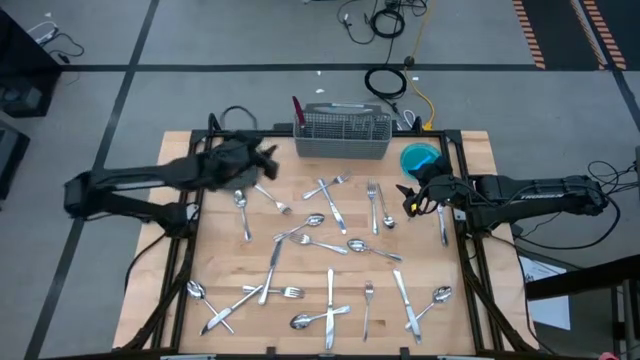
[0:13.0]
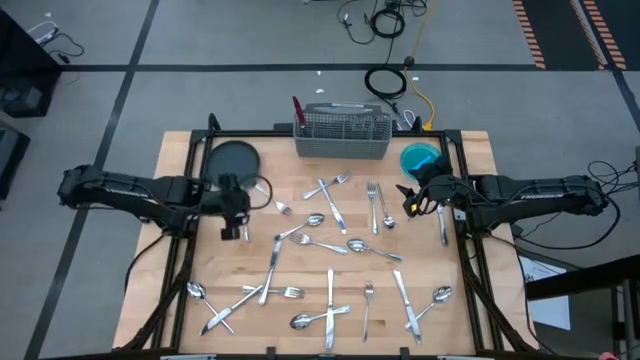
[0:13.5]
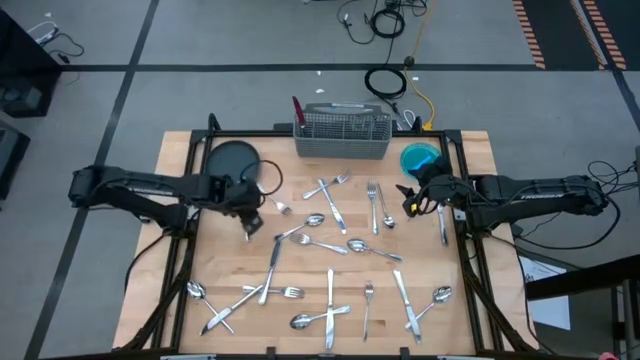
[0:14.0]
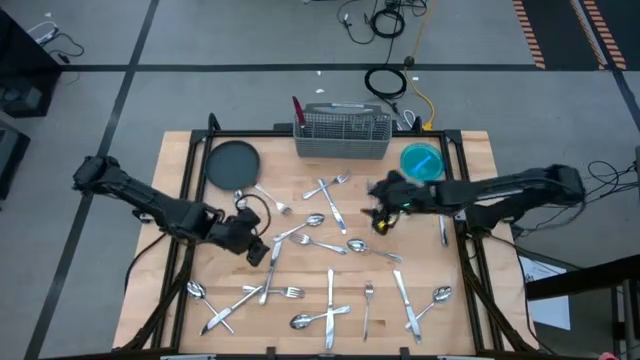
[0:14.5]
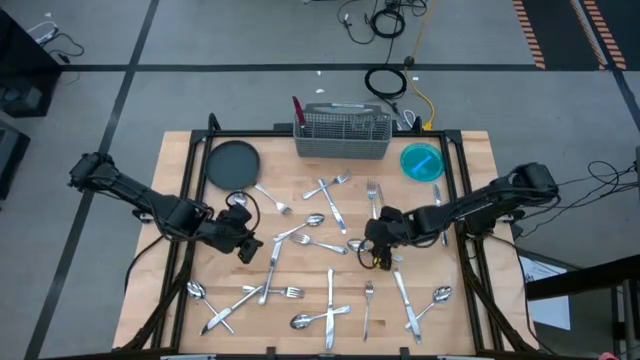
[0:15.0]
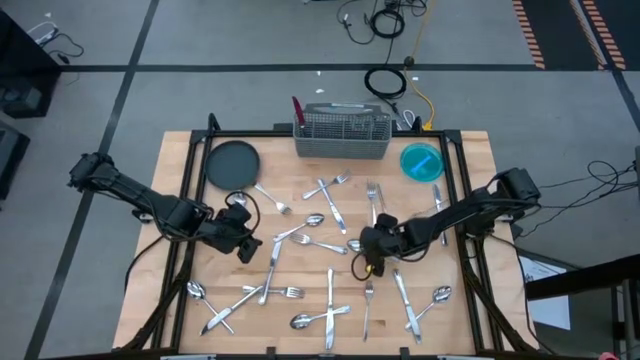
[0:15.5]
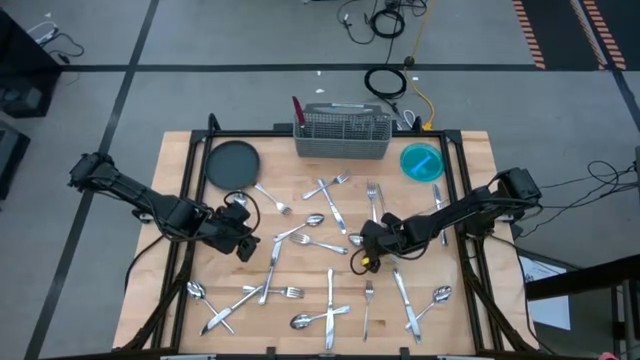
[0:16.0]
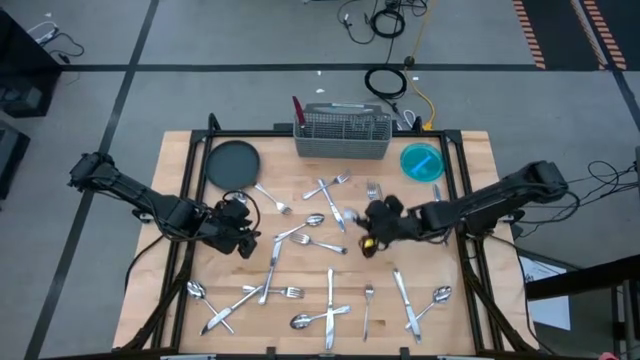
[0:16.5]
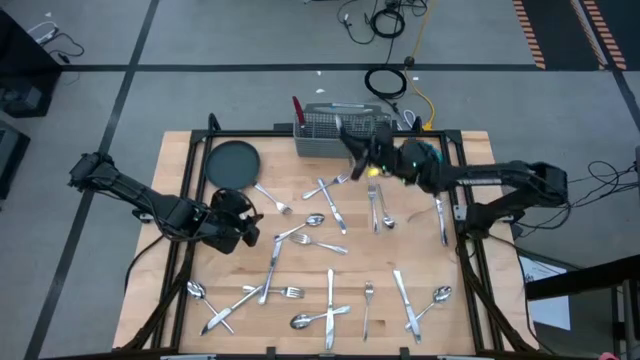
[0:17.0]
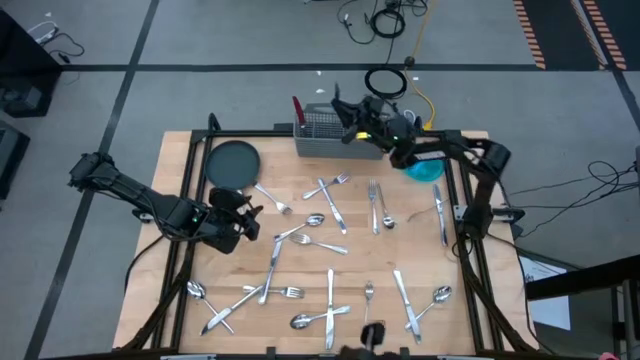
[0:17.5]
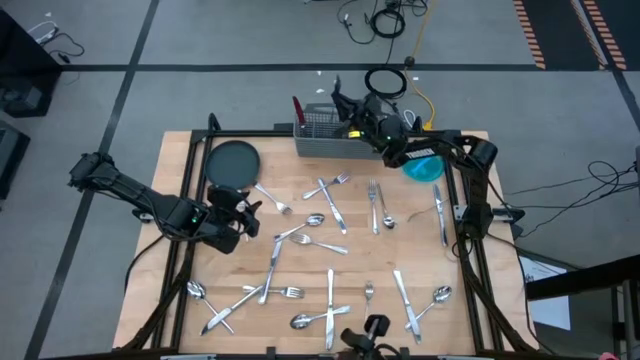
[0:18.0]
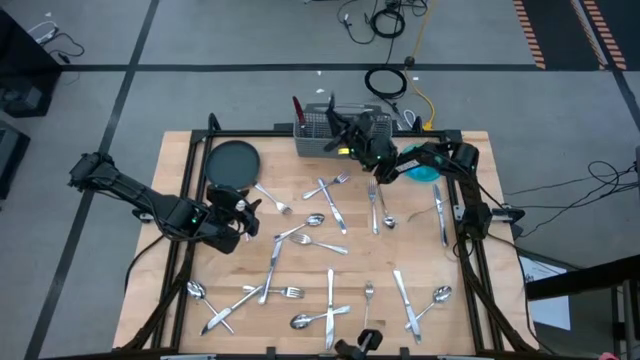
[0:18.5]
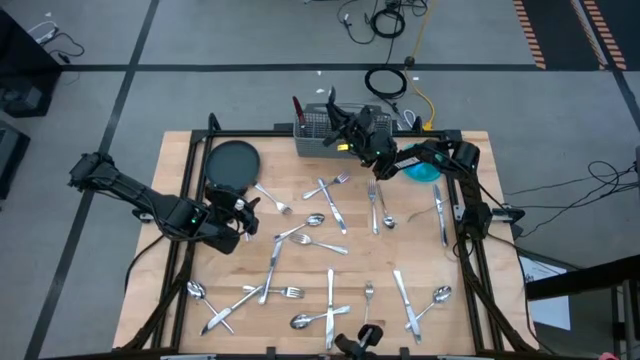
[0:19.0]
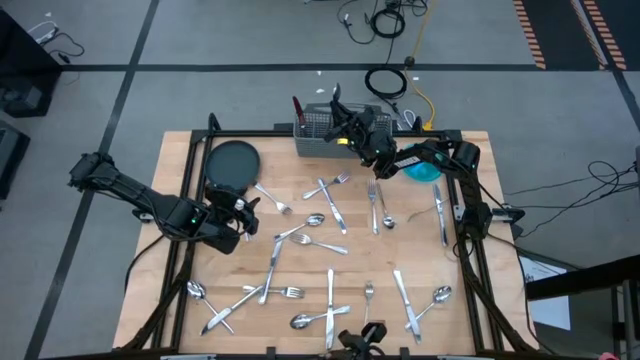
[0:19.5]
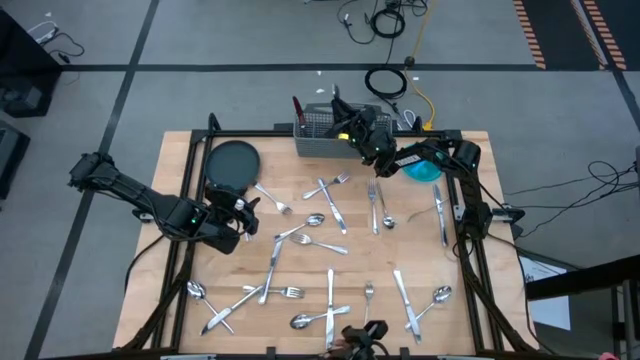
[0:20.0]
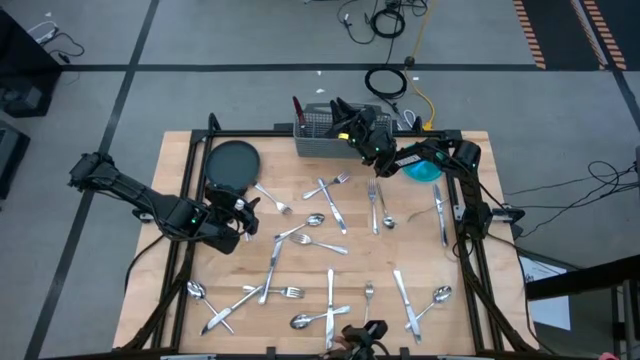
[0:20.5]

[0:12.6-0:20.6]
Task: Sort silverware
Put the spoon into the silverware organizer

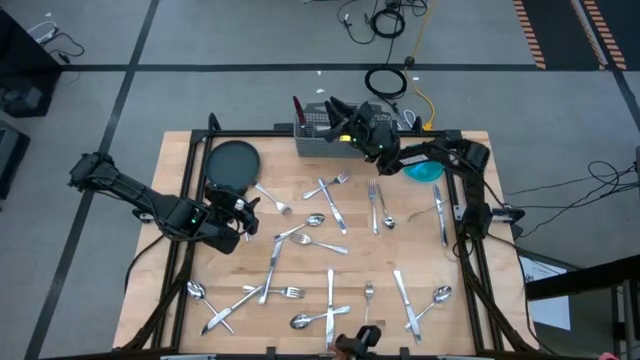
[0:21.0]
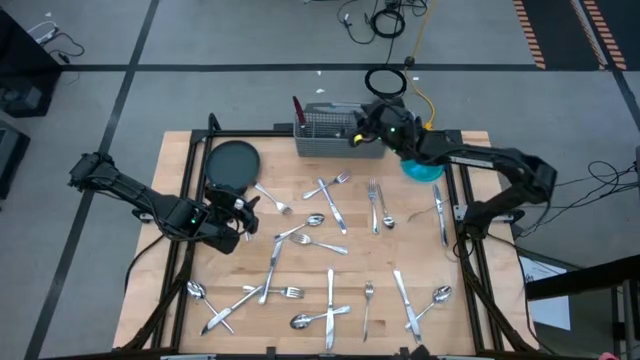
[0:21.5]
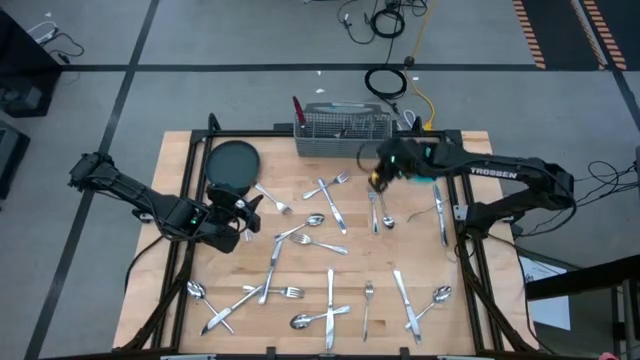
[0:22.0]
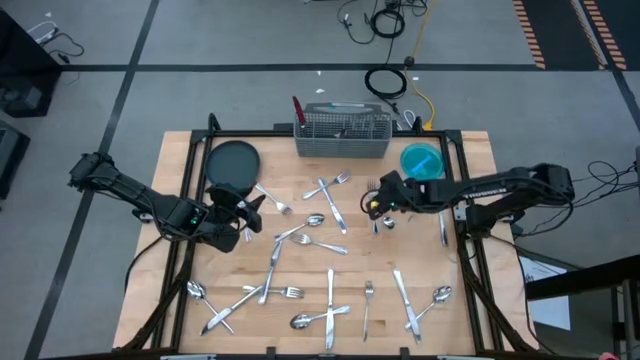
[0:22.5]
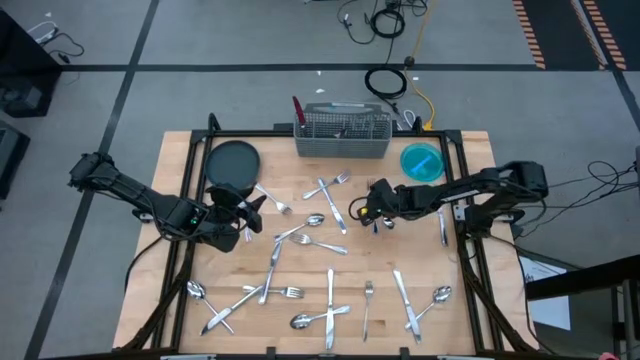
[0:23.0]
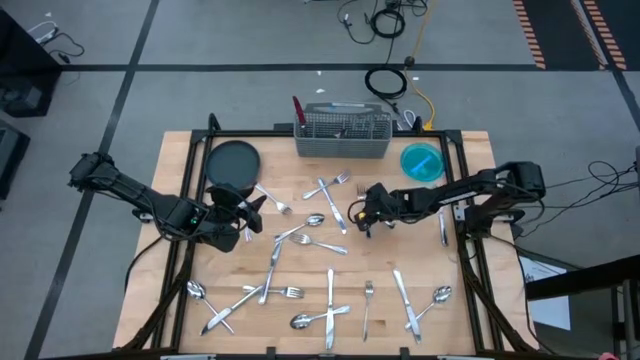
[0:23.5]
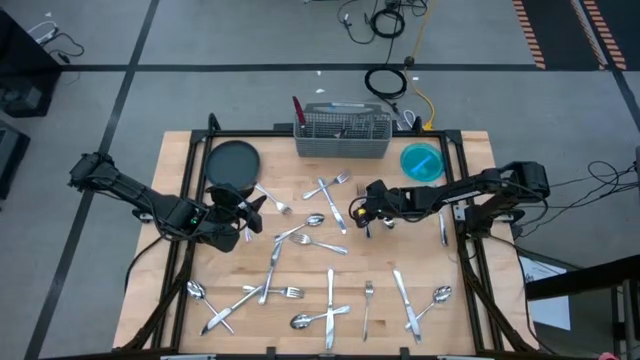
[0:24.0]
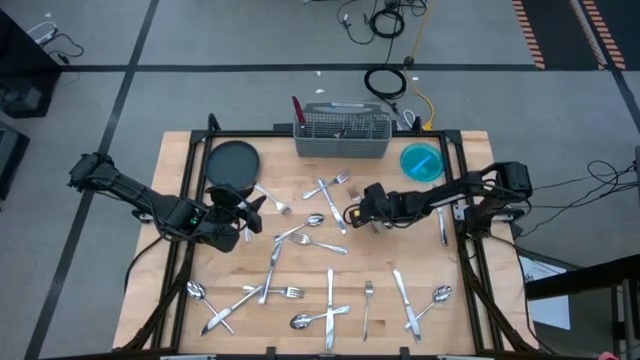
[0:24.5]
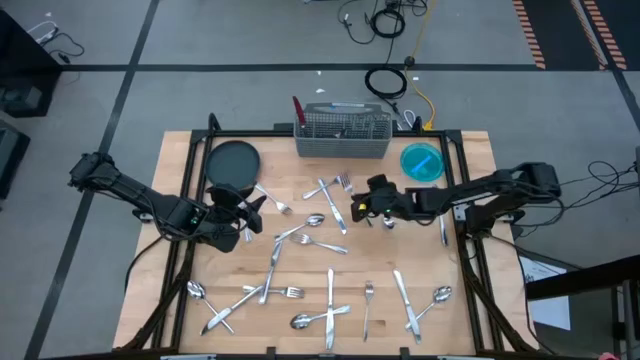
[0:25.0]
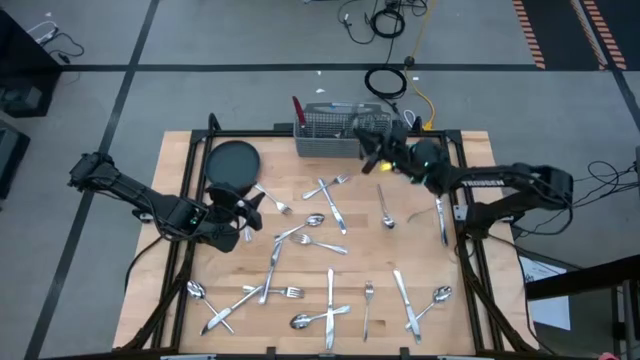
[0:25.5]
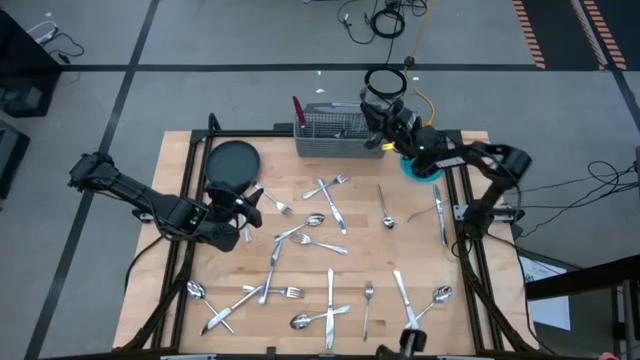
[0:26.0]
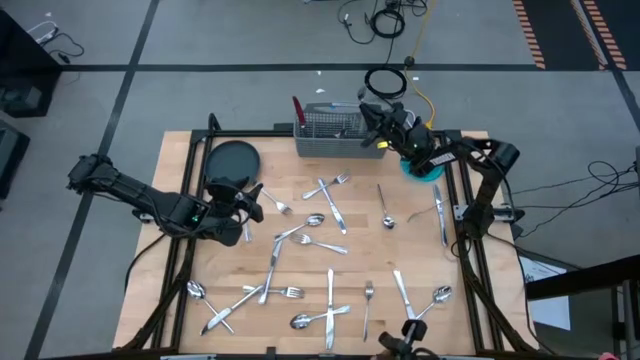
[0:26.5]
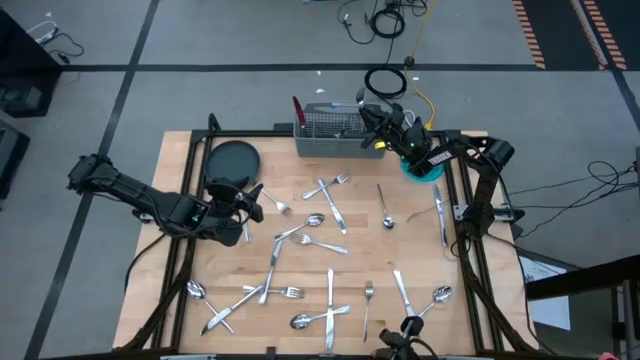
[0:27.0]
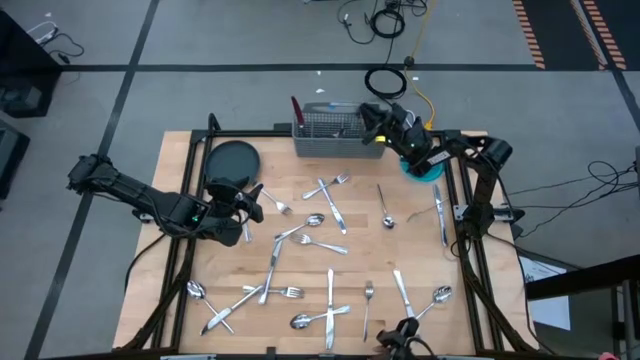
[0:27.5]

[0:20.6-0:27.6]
Put the fork into the silverware organizer

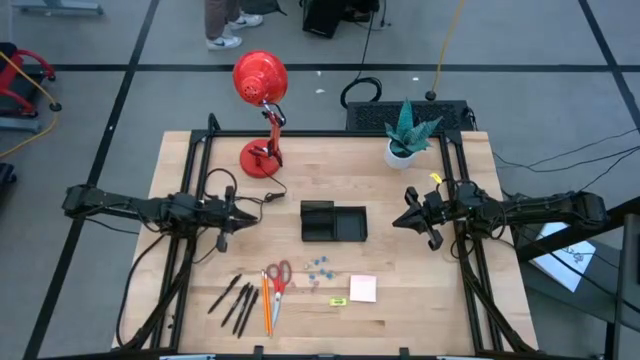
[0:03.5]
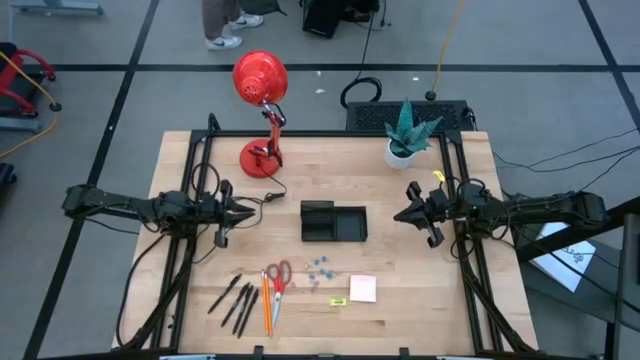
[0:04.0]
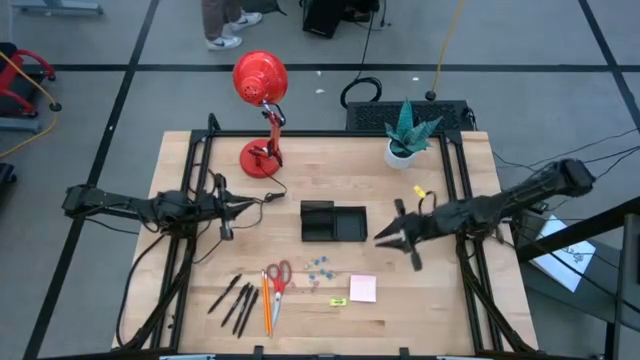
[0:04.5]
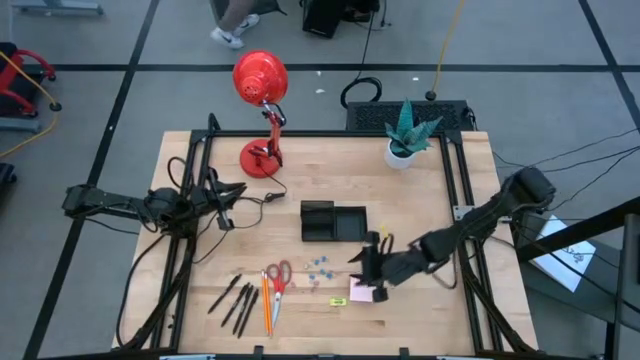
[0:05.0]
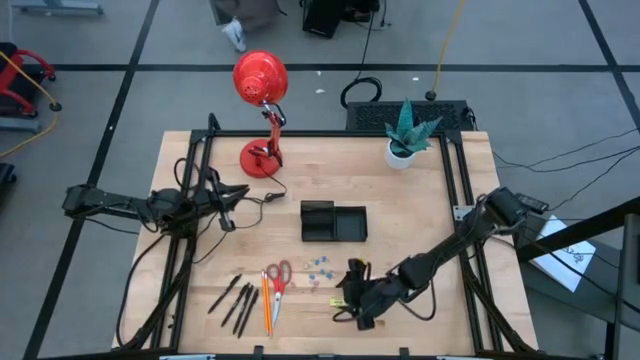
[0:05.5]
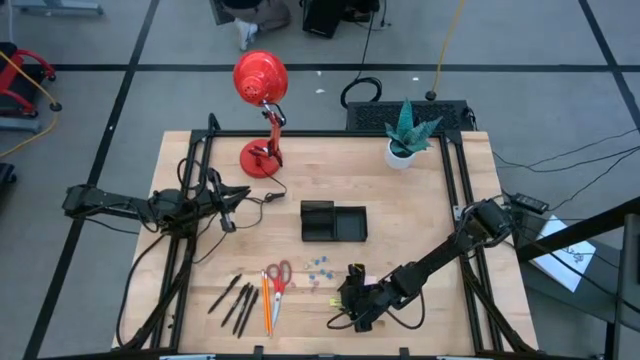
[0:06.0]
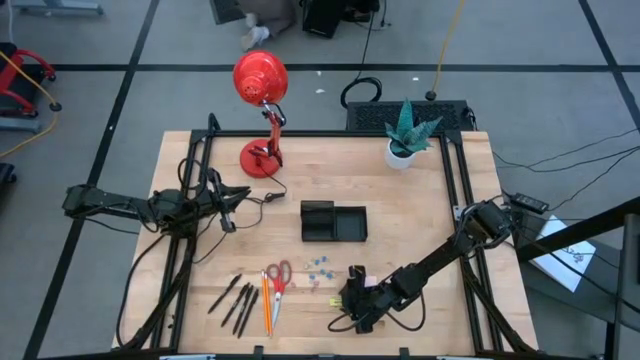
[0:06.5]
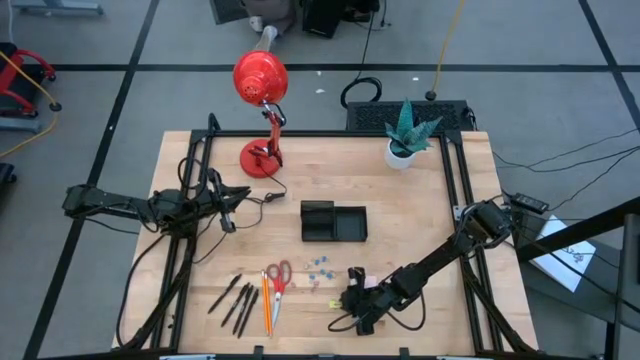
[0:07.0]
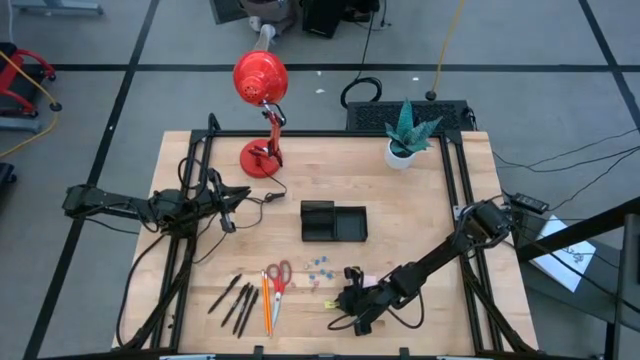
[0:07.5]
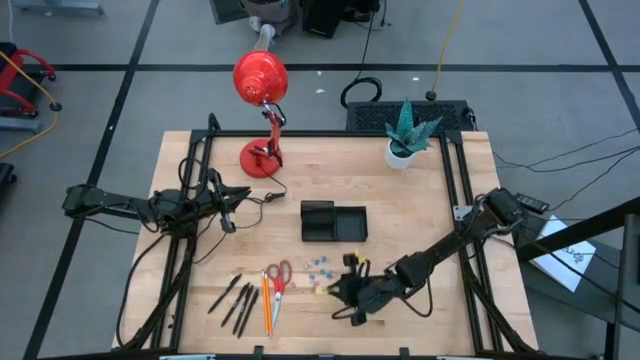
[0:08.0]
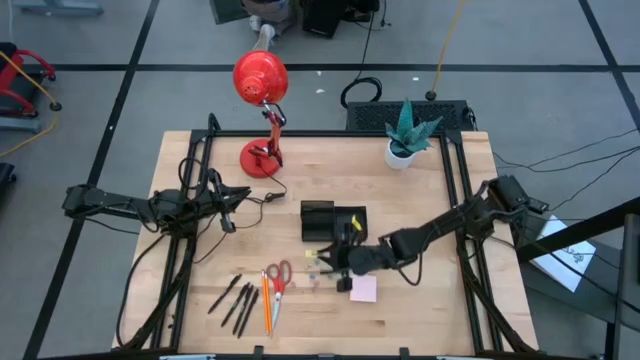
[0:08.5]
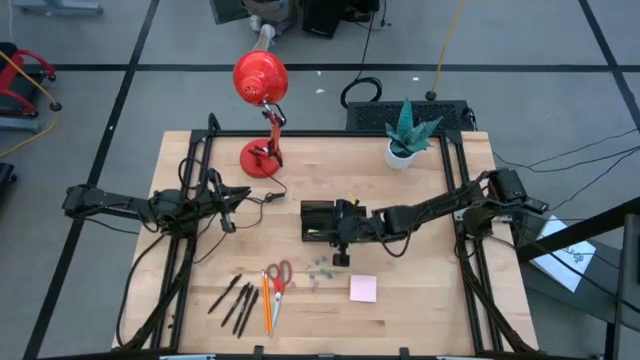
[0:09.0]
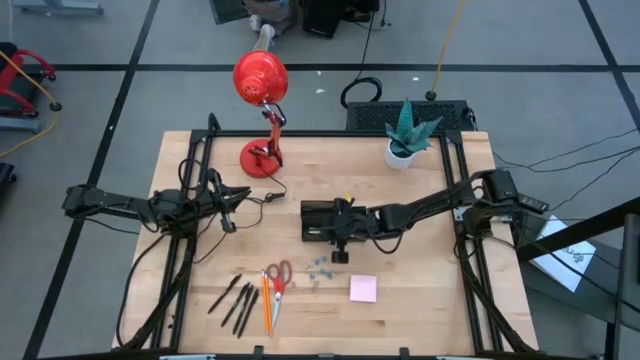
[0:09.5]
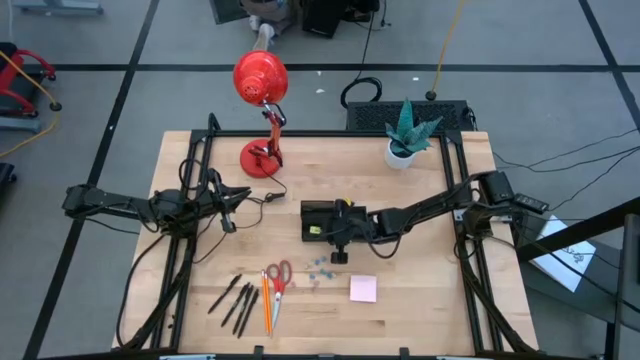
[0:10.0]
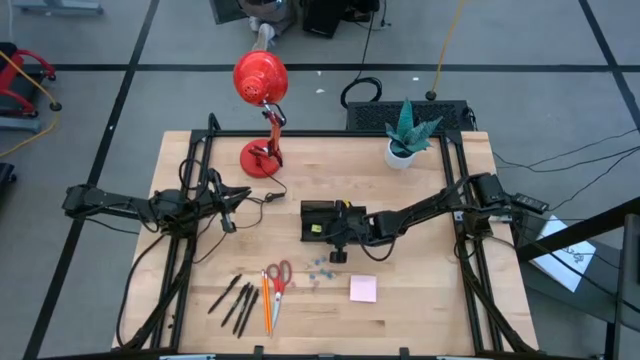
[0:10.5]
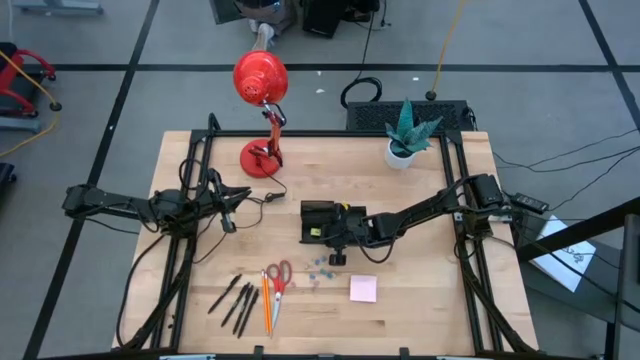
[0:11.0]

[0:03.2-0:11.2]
Task: Pick and place office supplies into organizer
Put the green eraser into the desk organizer
